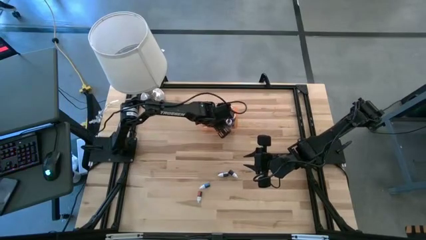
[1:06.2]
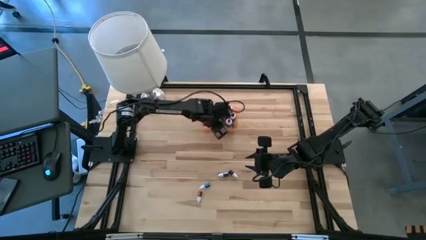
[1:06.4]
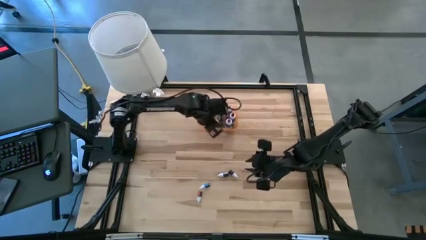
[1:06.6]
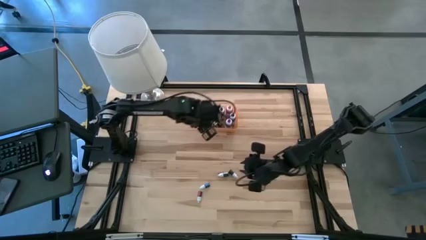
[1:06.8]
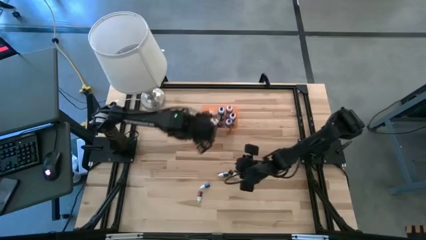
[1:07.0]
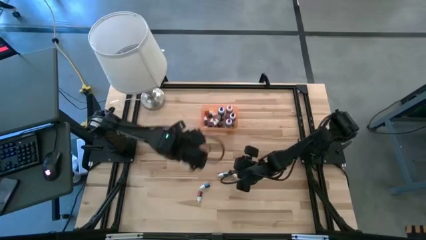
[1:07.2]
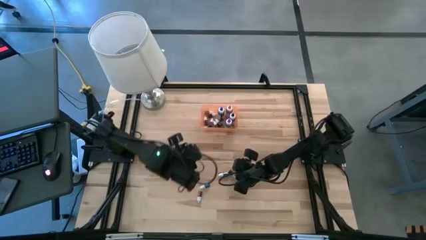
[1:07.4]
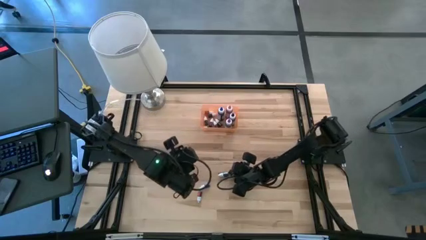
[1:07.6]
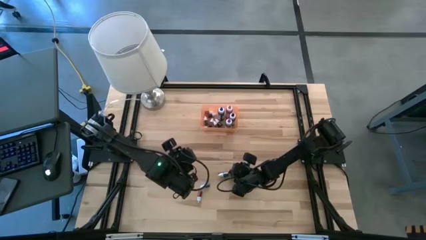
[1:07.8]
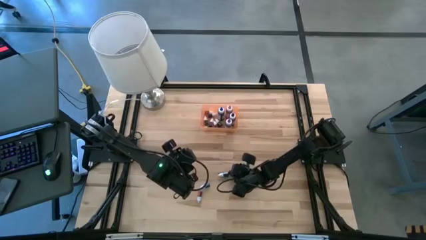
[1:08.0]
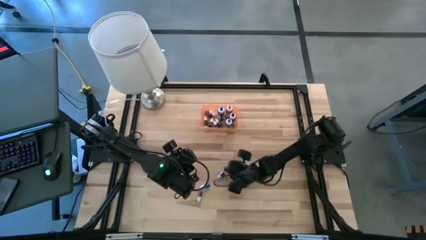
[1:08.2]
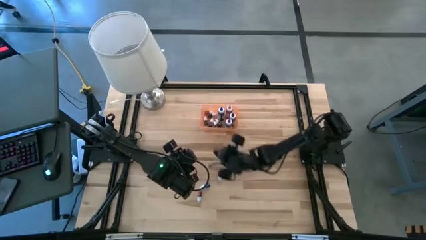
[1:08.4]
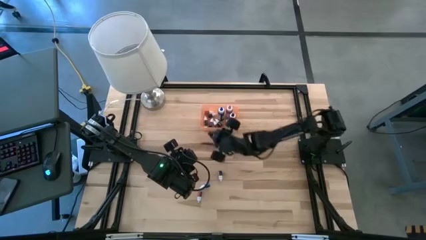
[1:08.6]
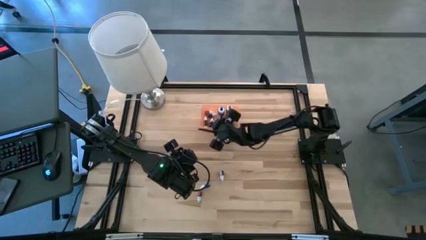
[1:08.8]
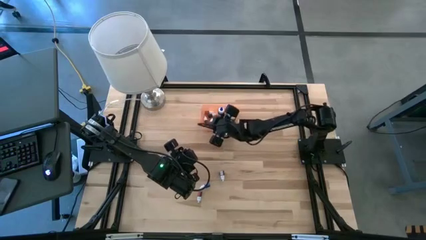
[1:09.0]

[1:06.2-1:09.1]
Task: Pick & Place food coloring
Put the small light green food coloring bottle into the bin

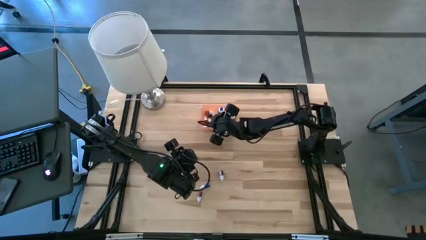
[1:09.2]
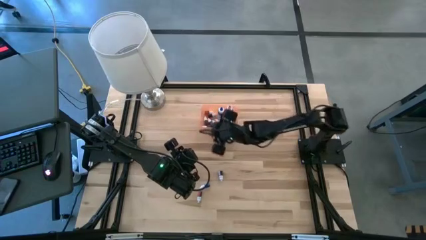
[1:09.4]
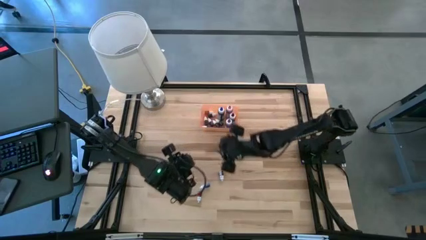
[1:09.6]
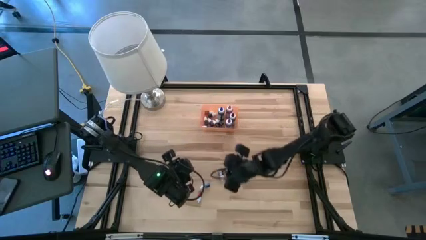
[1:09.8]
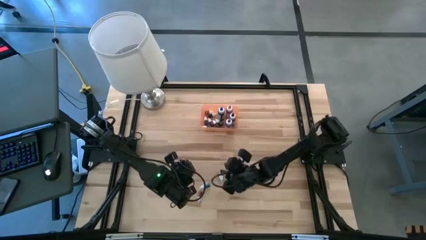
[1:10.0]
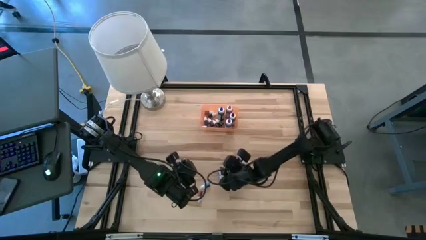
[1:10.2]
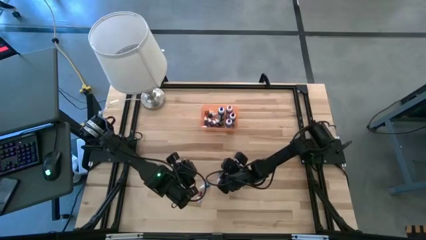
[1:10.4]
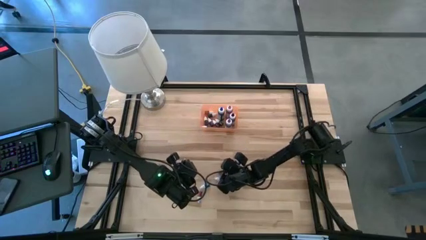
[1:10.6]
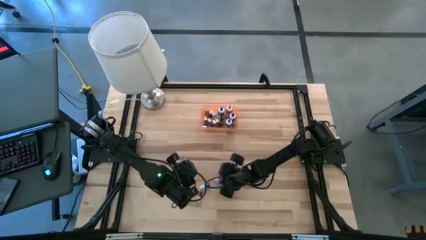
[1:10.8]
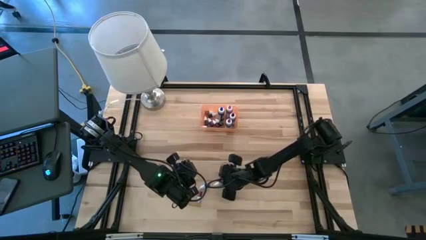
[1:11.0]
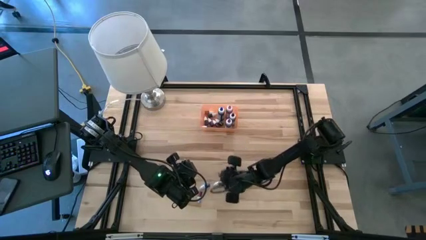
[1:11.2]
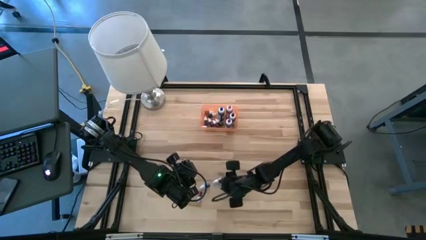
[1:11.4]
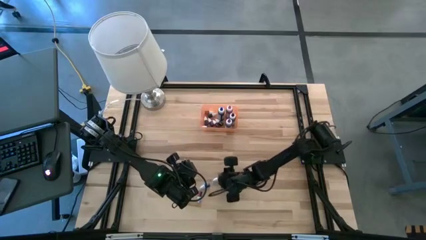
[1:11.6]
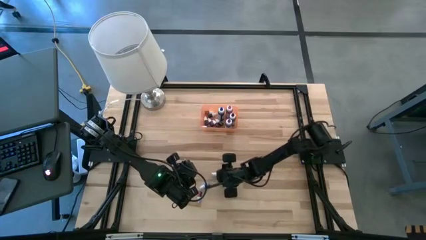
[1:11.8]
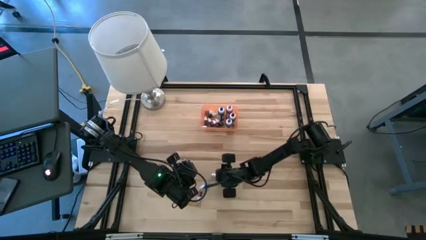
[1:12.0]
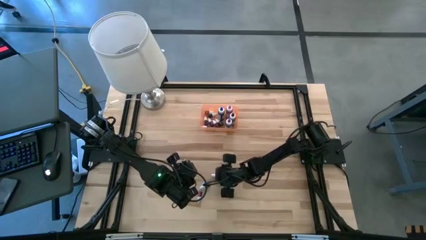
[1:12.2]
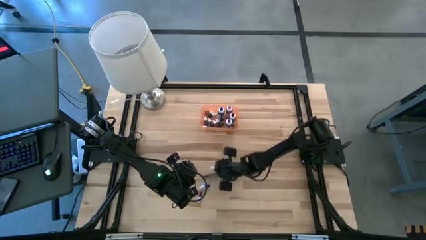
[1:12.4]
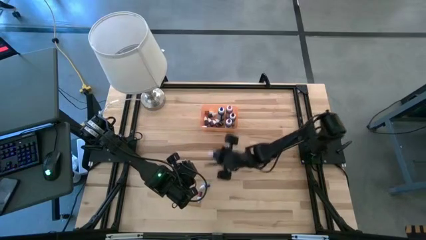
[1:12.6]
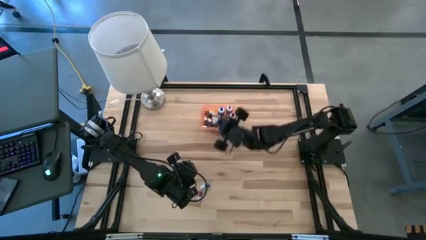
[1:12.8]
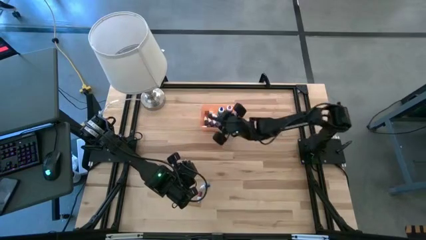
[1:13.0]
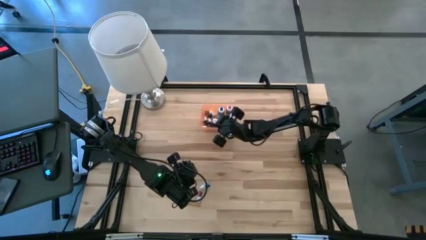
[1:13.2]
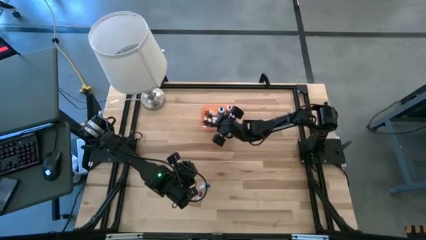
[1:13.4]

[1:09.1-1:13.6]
Put the small black food coloring bottle into the bin

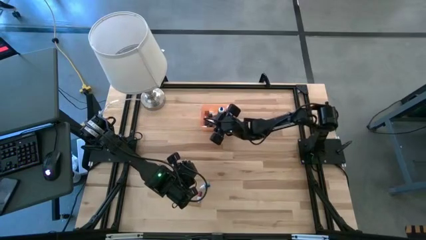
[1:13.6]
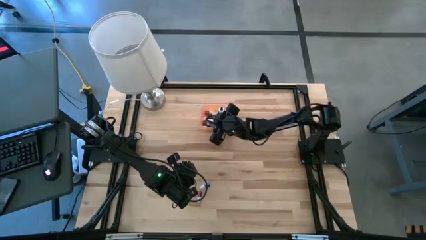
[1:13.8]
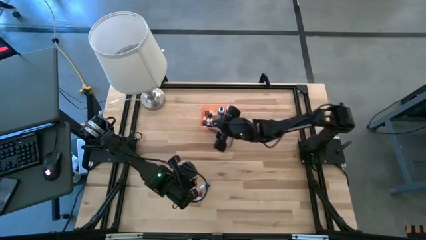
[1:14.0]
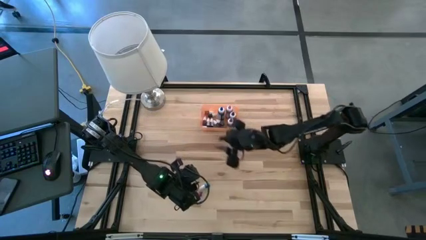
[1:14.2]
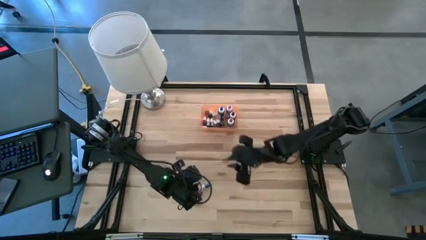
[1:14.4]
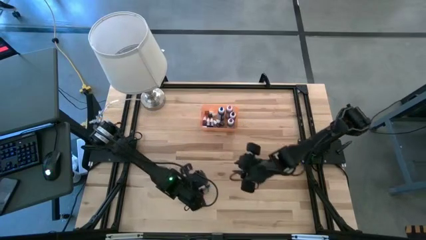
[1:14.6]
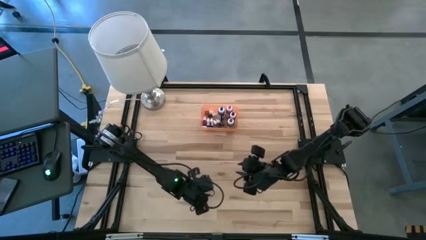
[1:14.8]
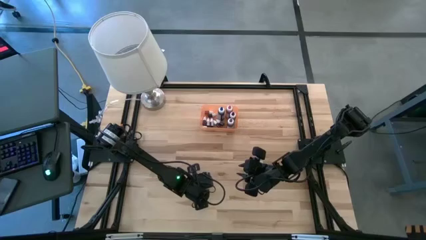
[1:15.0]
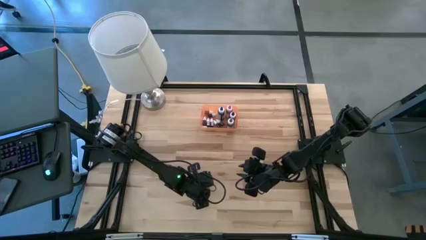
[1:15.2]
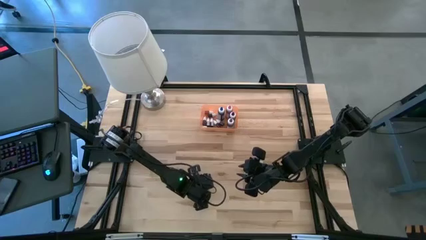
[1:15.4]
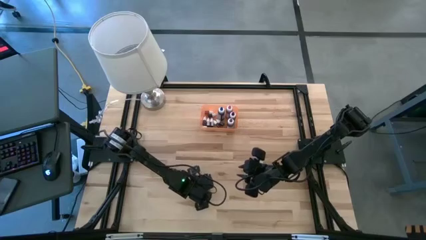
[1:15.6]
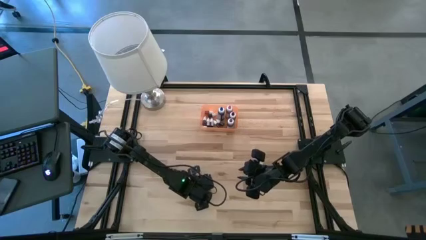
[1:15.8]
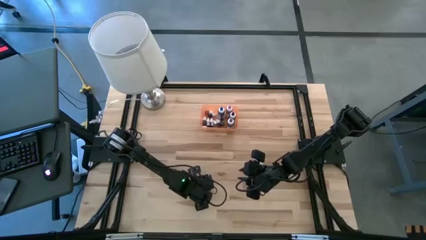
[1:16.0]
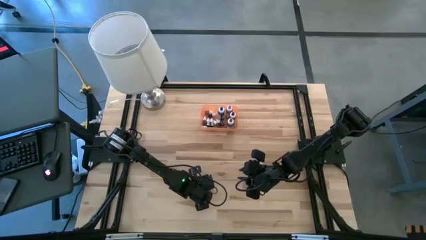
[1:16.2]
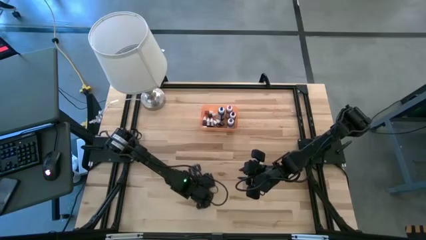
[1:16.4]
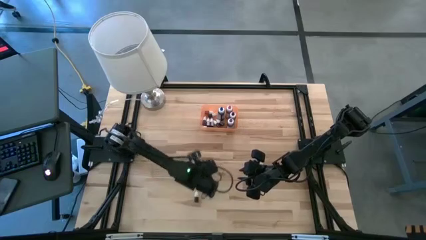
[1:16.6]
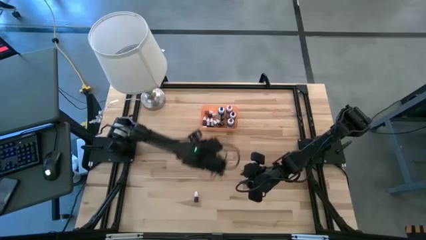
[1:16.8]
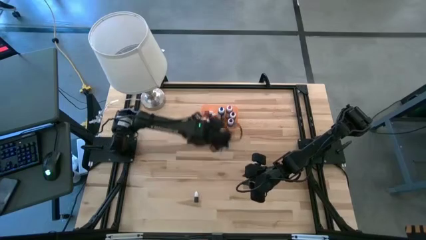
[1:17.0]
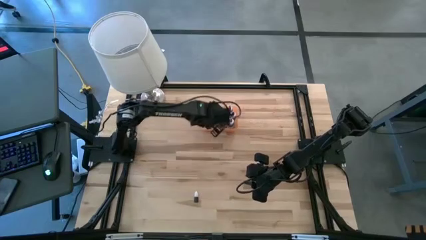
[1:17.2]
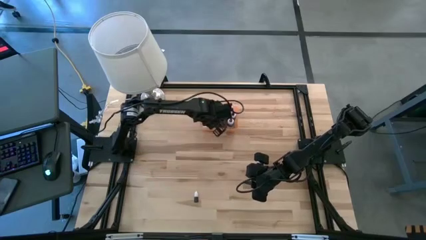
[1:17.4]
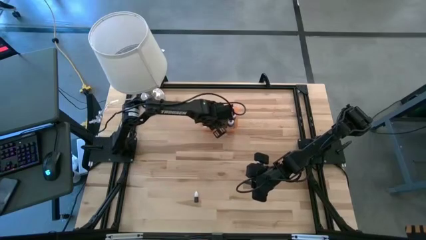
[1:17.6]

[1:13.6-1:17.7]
Put the small blue food coloring bottle into the bin

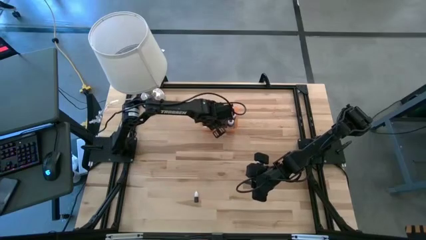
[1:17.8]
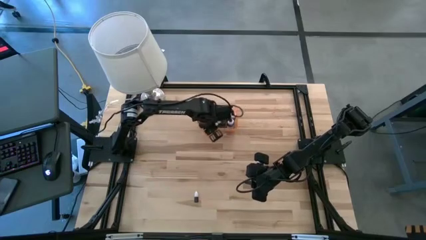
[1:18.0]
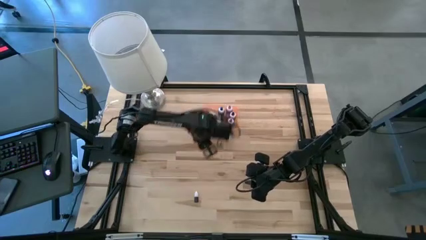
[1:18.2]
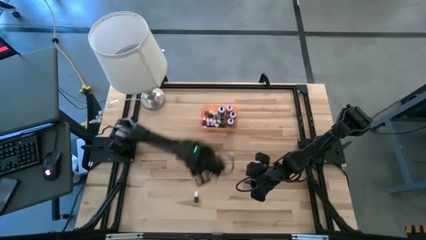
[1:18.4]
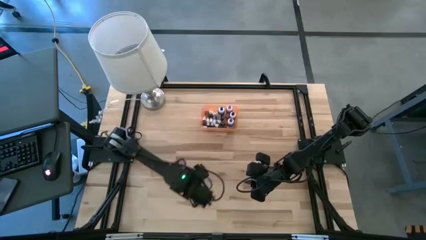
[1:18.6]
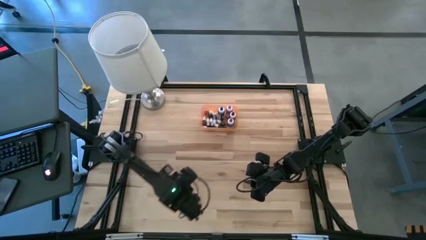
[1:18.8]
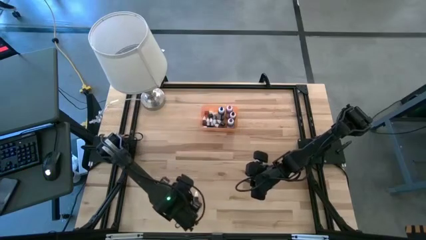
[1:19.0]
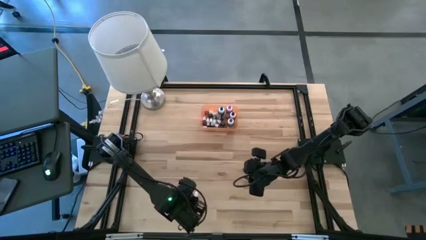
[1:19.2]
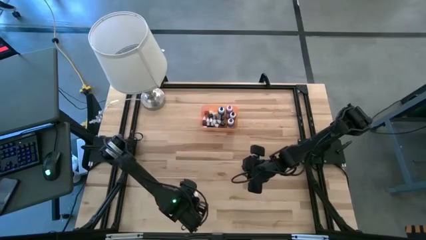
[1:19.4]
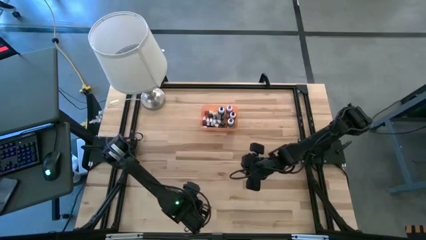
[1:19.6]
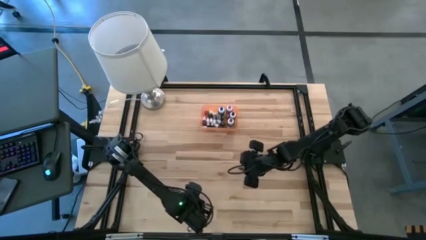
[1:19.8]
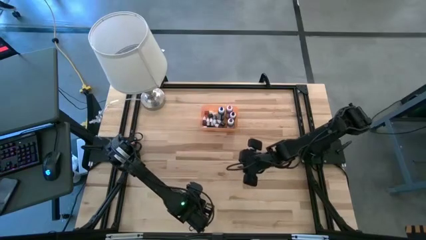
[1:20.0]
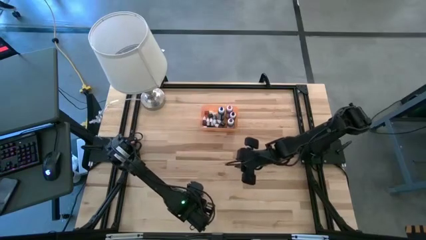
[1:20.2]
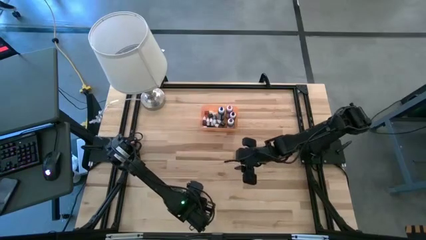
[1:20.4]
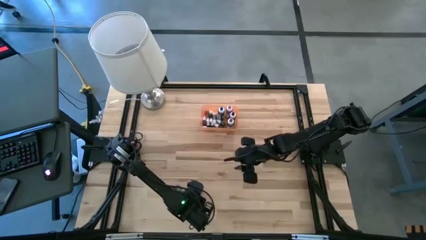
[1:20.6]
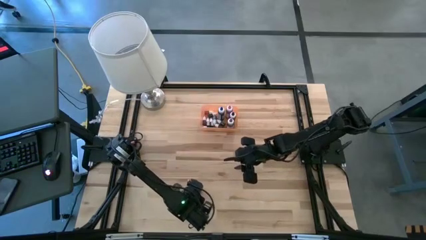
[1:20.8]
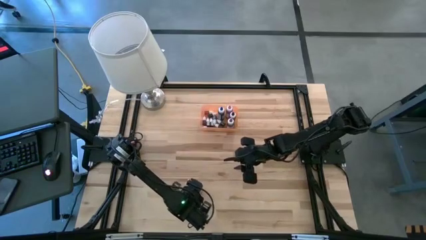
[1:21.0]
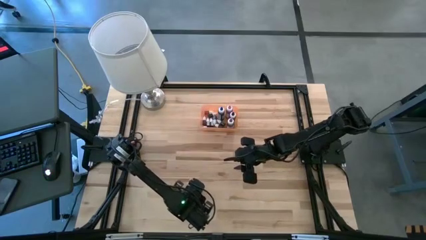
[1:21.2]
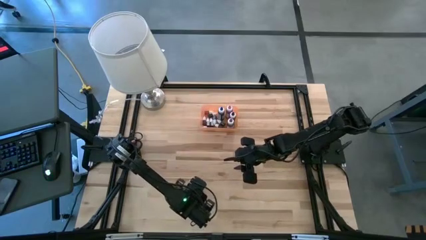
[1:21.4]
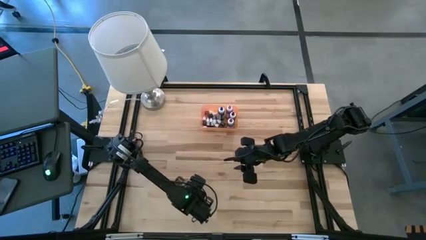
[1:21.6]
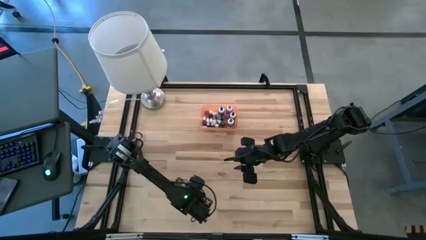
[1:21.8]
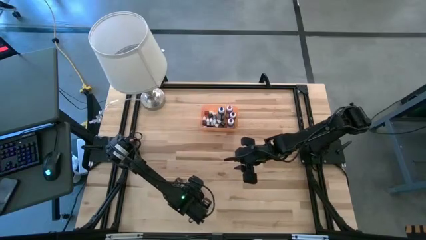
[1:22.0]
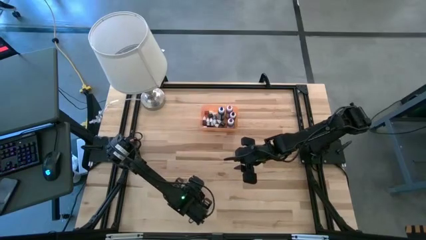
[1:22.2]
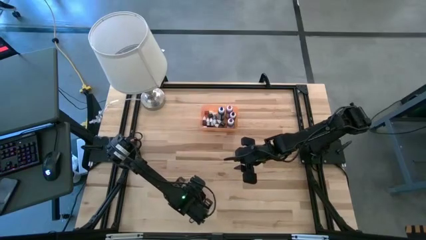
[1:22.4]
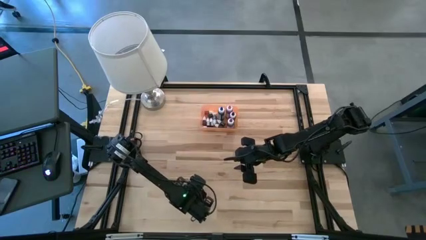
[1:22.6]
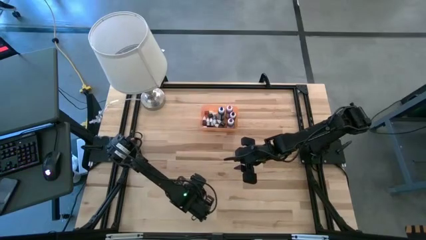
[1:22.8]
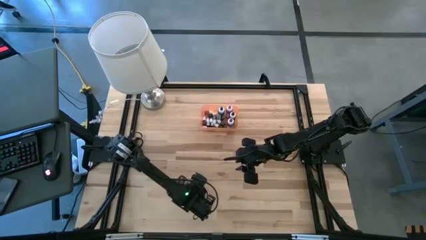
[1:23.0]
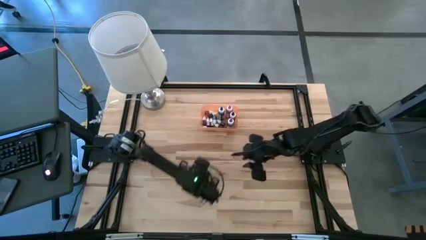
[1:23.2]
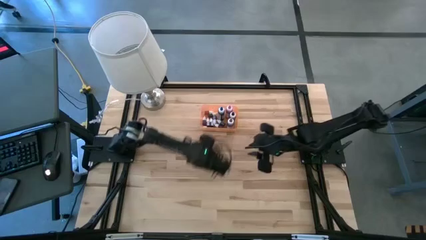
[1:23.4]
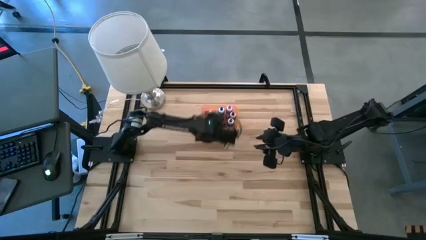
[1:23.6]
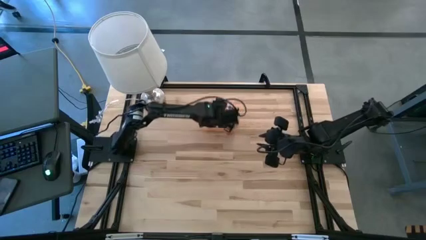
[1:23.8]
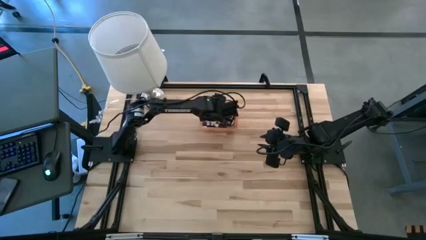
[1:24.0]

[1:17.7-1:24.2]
Put the small red food coloring bottle into the bin
